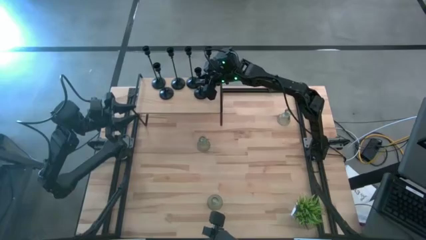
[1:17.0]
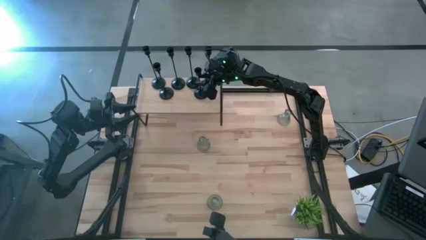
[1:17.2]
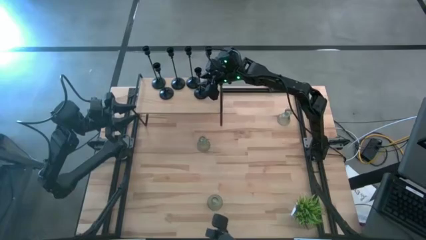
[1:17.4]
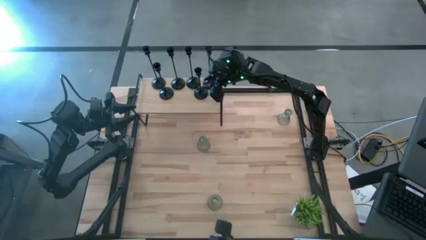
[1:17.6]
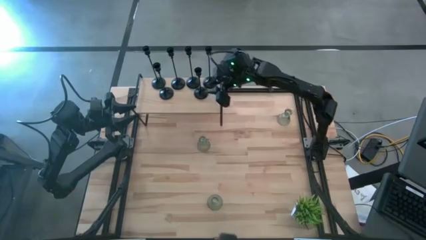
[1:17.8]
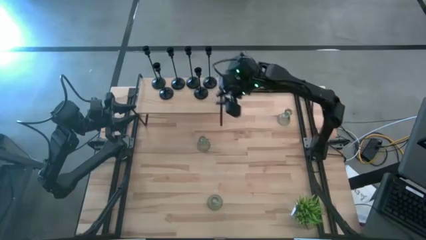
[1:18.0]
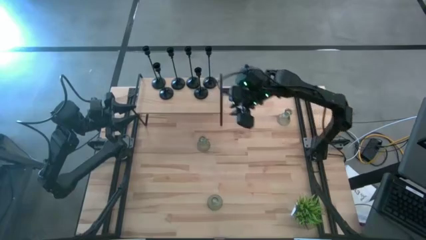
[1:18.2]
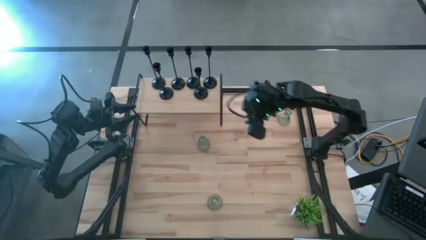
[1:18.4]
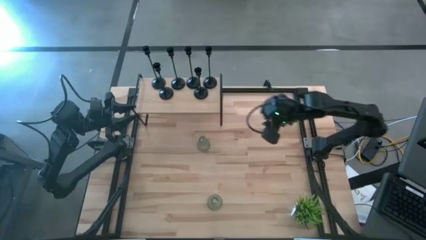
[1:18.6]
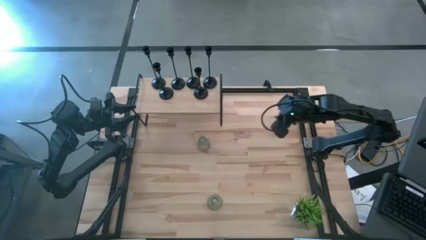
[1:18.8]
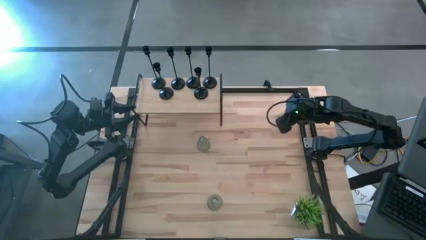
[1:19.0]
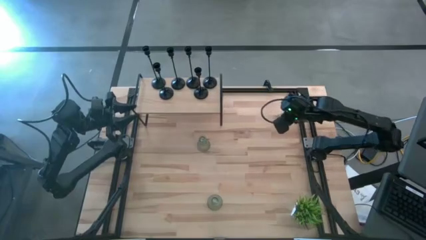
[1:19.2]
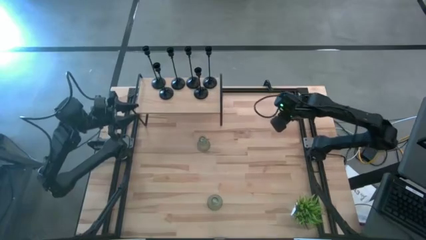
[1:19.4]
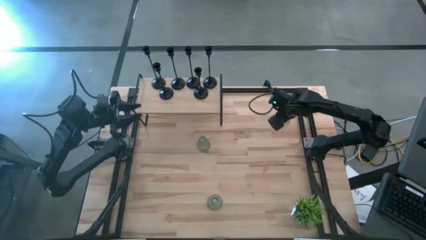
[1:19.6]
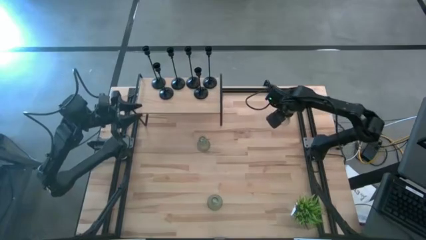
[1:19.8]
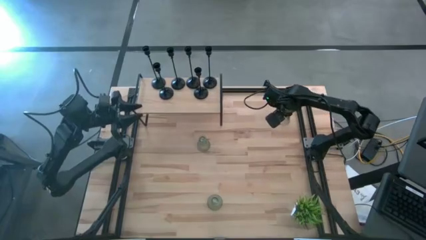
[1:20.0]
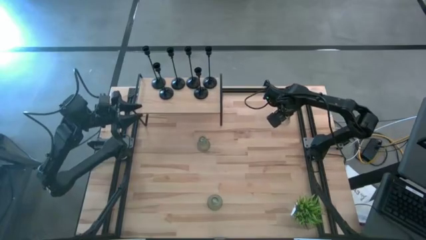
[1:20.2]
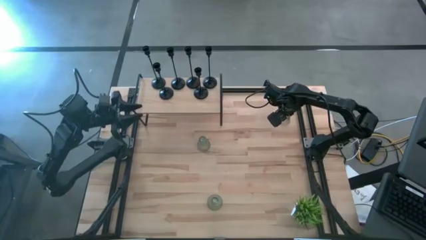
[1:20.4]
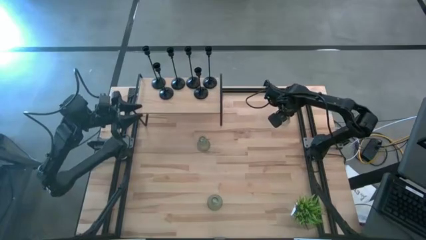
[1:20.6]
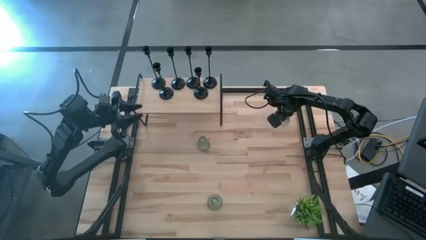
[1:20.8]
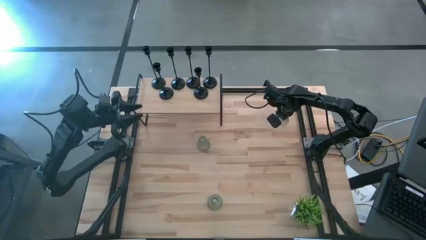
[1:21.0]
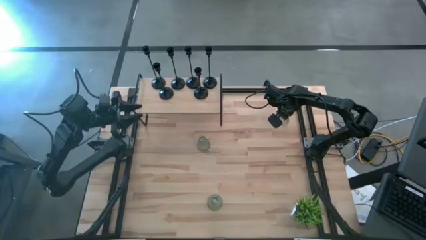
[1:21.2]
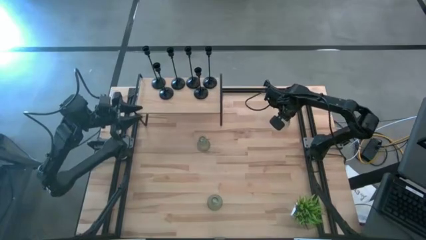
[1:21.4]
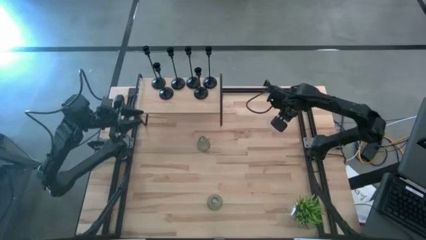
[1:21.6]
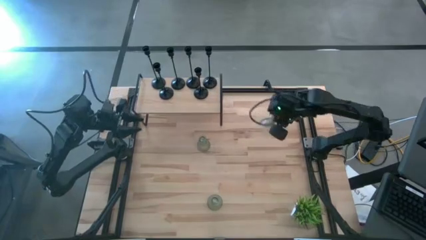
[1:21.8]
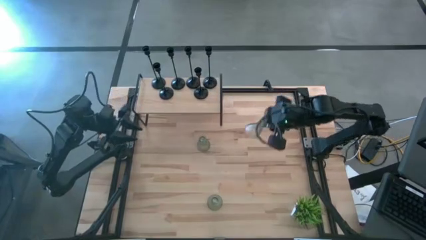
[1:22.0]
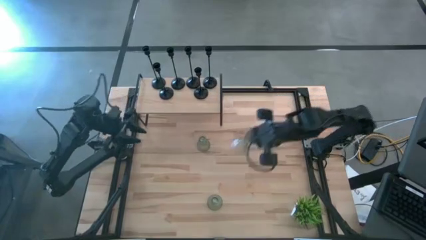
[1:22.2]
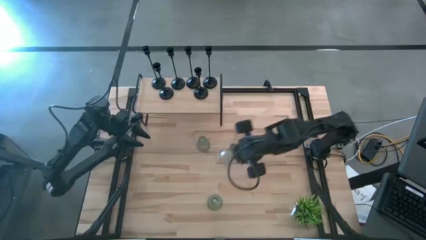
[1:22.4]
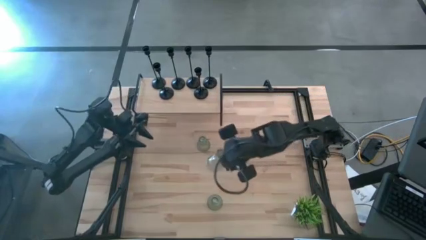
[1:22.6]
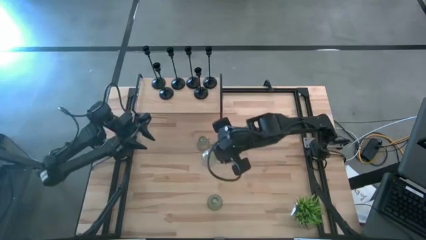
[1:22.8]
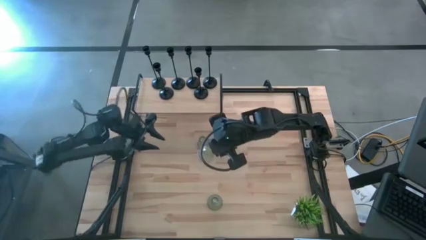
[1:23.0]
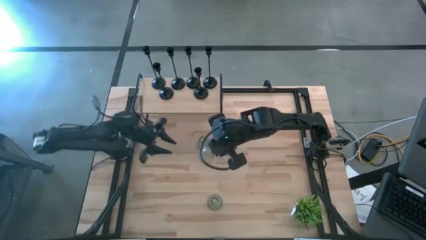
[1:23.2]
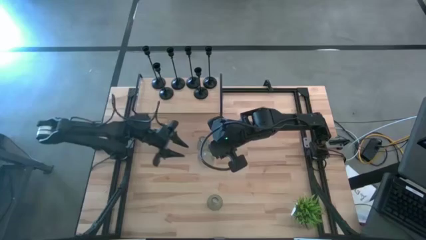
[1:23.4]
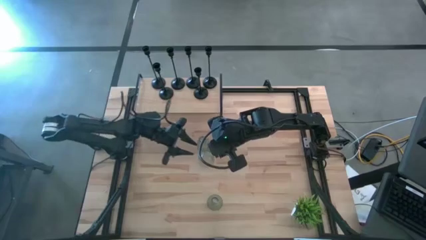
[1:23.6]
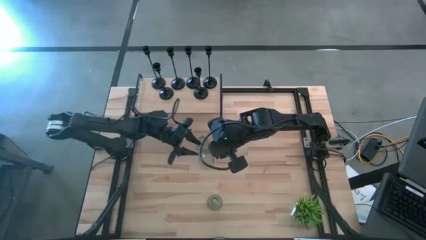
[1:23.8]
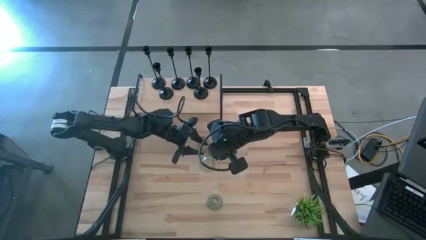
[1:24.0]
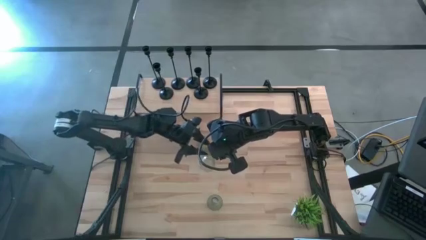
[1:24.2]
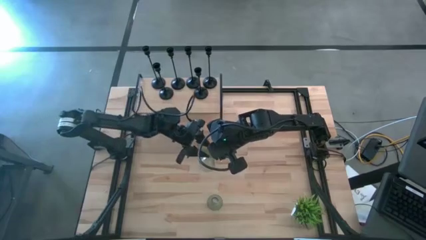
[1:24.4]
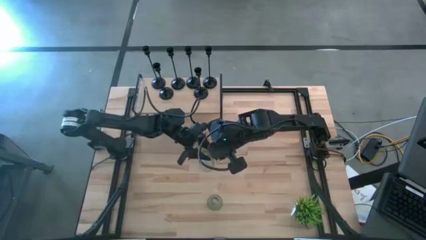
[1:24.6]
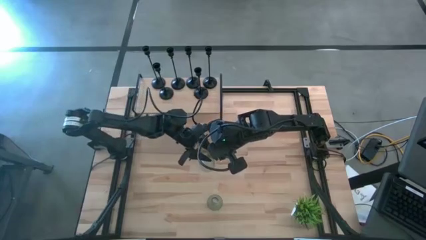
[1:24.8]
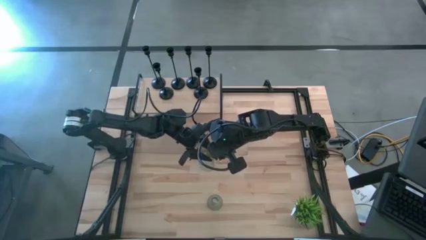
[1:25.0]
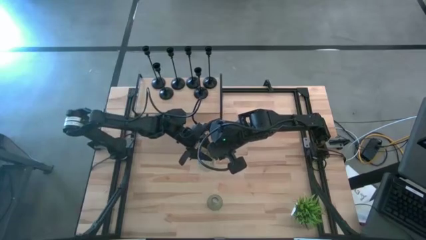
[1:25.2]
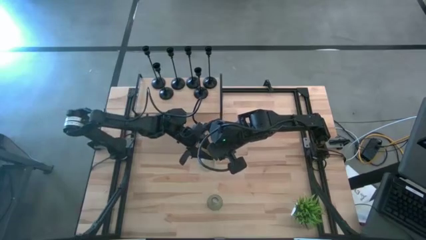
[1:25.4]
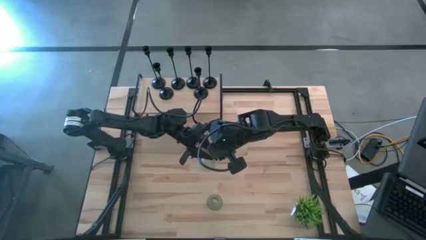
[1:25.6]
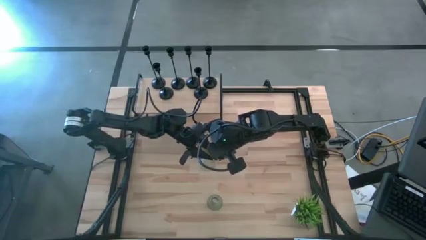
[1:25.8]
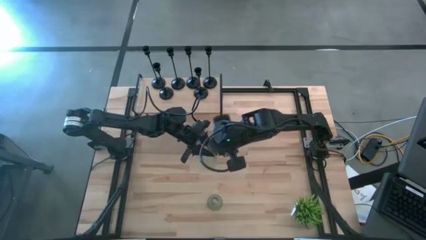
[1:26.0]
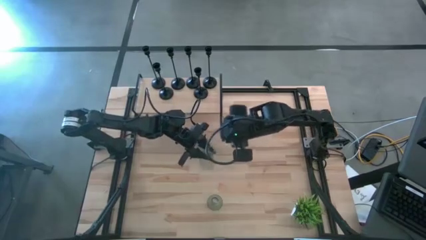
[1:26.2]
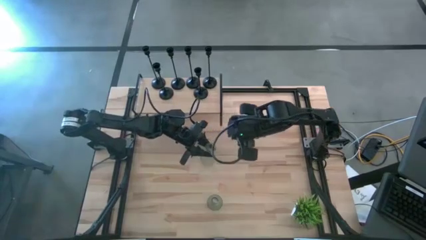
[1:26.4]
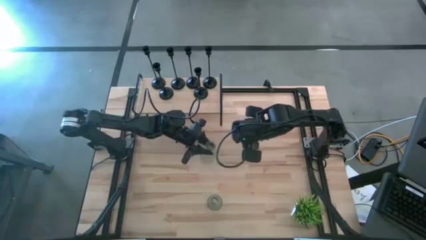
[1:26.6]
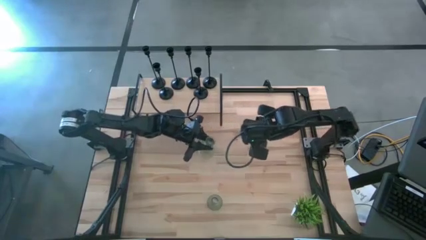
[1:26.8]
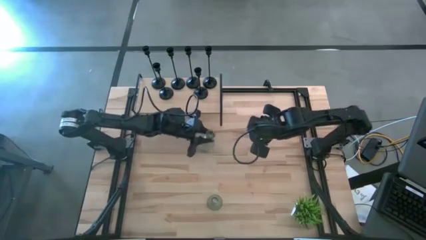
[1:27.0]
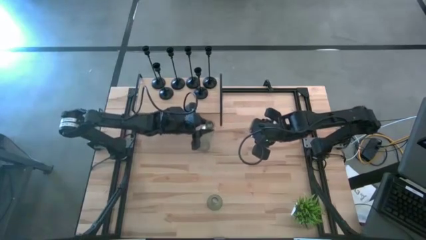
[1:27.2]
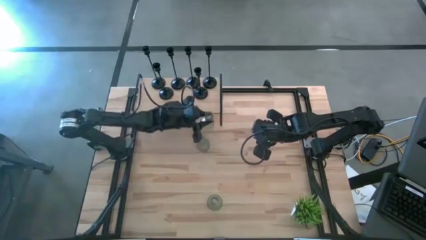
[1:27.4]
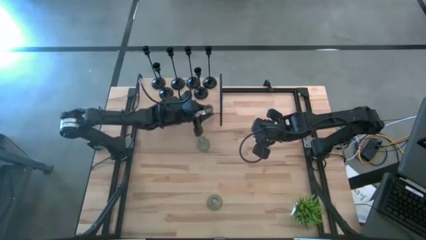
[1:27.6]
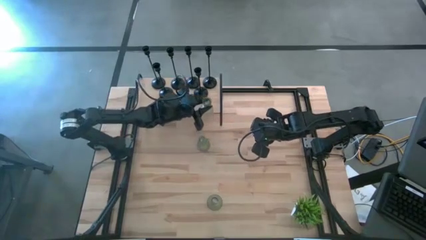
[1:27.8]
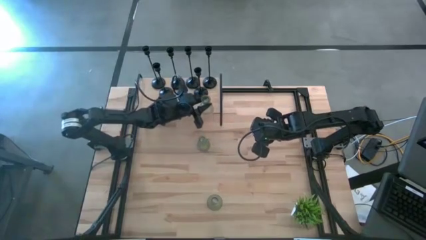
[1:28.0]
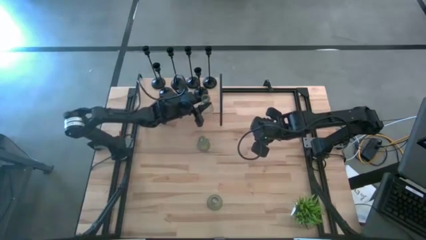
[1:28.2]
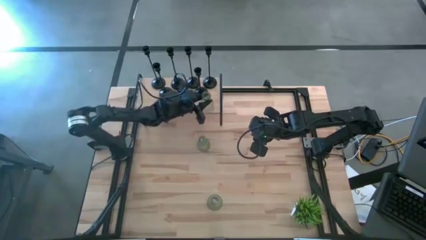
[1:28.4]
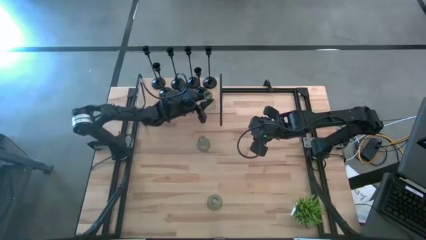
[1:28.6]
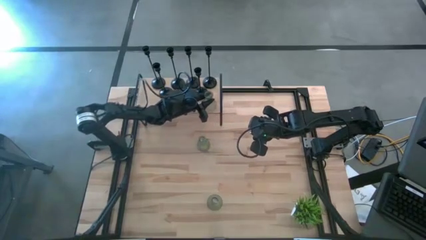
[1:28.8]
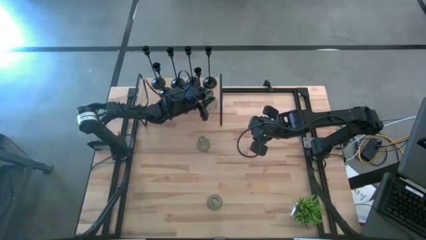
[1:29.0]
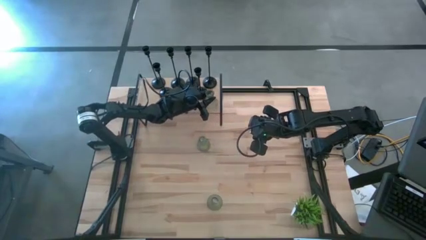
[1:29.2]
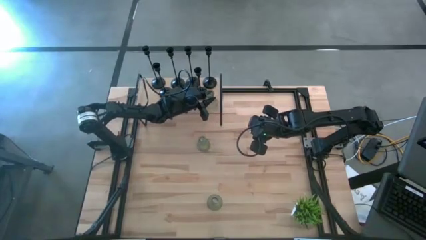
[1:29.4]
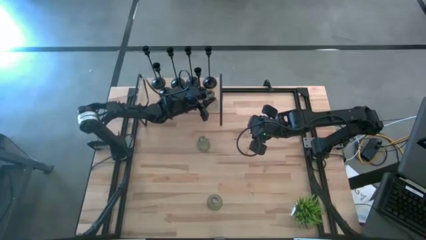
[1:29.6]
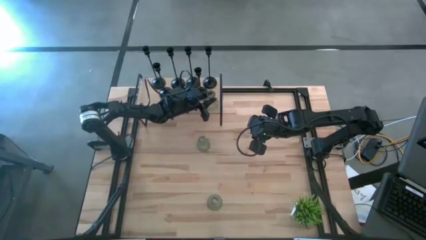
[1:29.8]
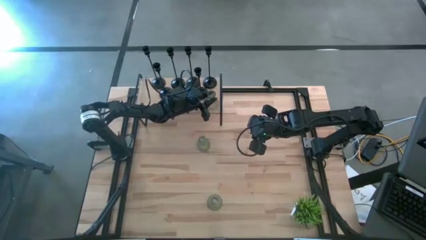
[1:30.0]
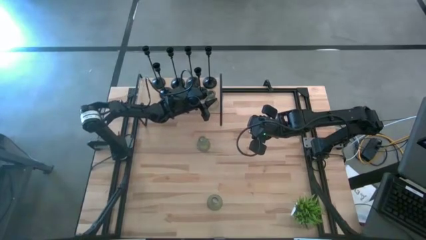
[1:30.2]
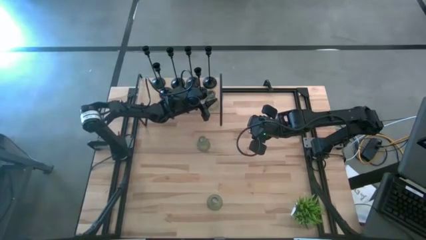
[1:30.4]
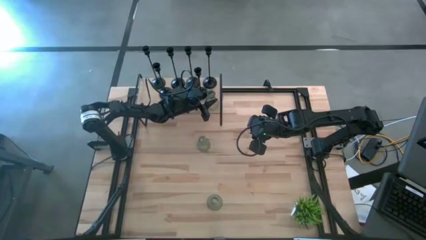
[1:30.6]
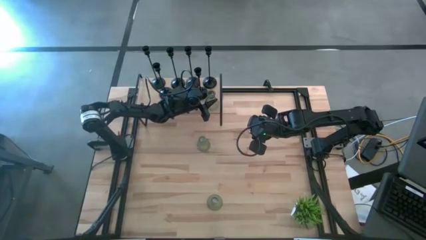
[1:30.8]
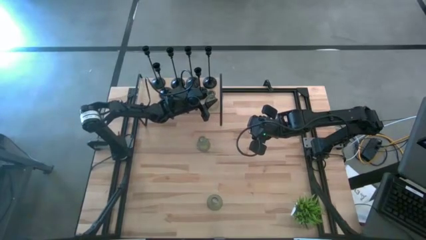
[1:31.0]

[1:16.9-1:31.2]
Task: Pick & Place candle stick holders
Put the green candleholder on the shelf
